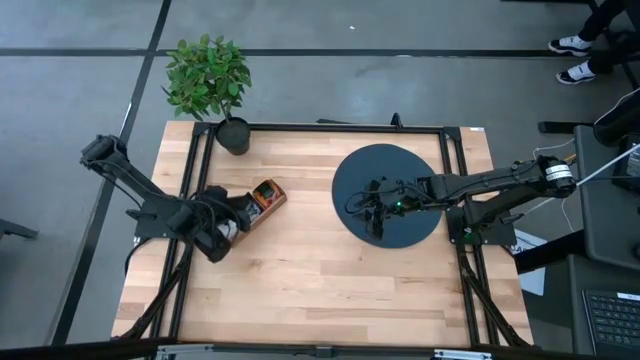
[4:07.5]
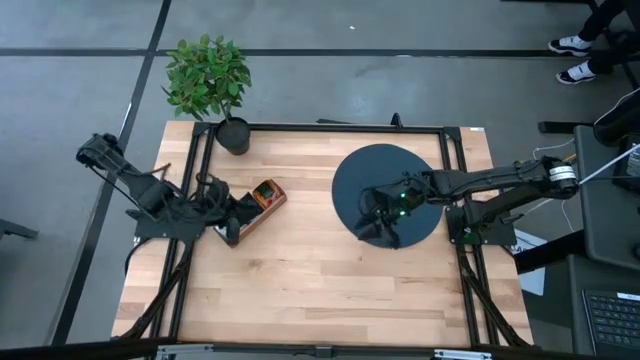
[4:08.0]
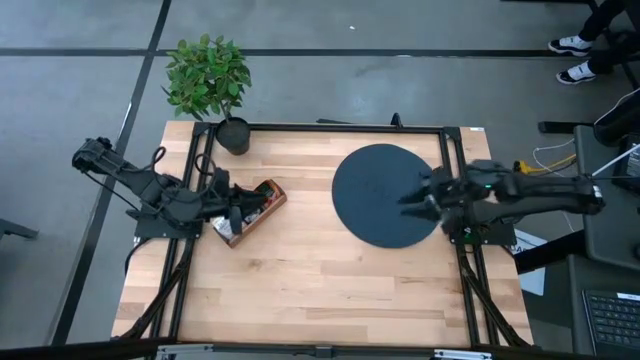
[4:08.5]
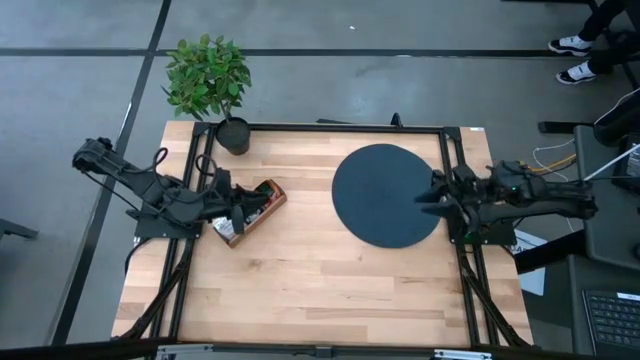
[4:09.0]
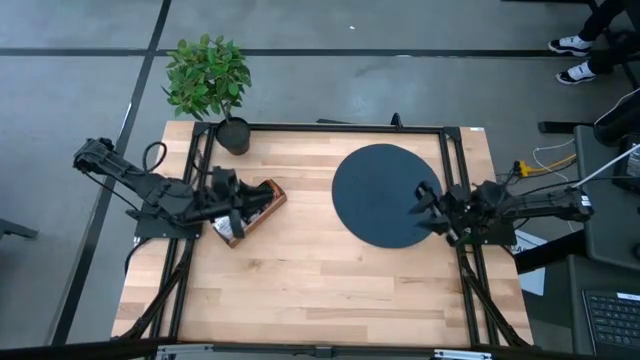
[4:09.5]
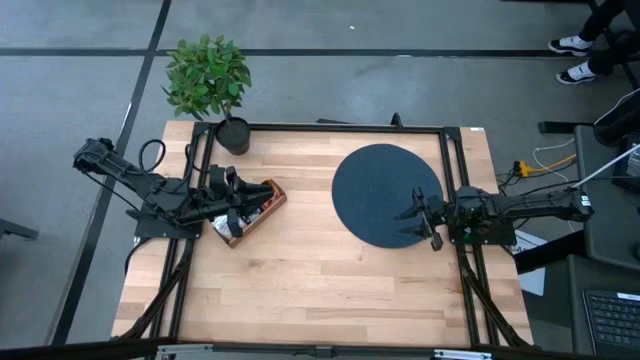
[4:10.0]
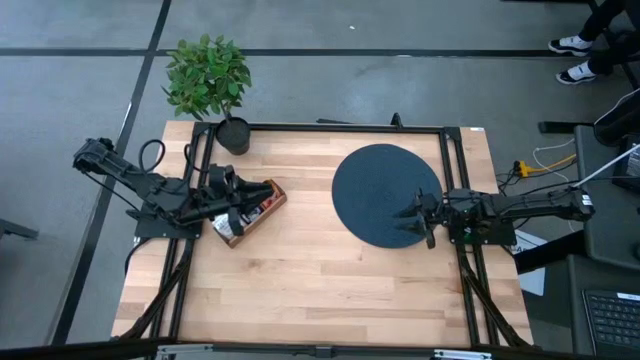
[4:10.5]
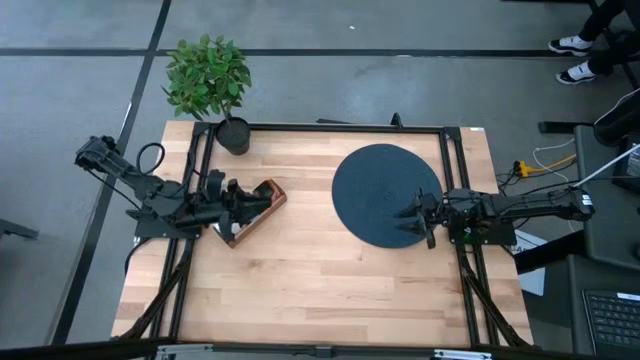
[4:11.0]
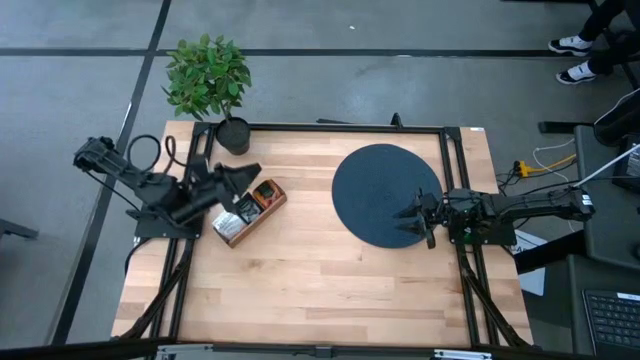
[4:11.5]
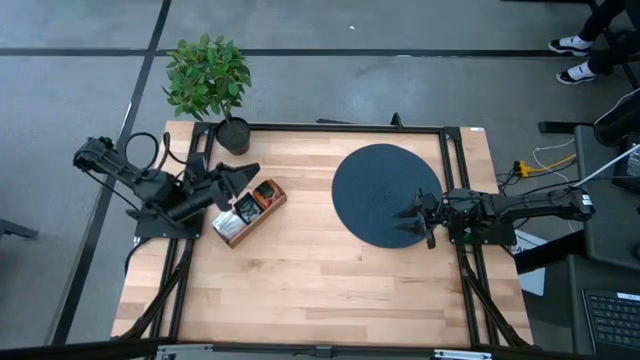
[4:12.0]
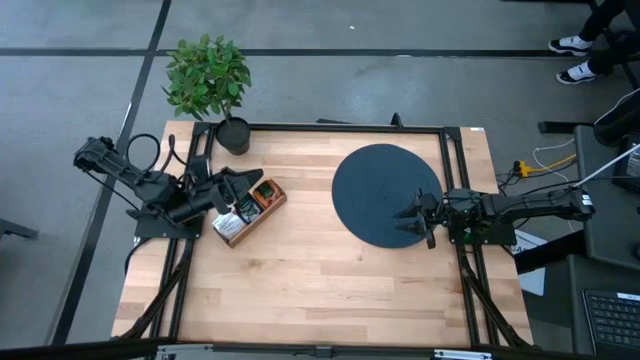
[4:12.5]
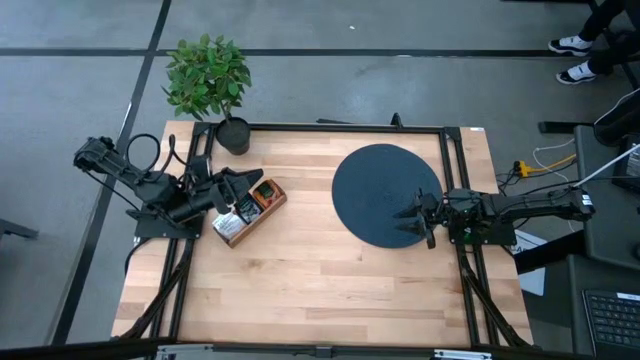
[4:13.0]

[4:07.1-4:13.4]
Task: Pick & Place Tea
Return to Home Position

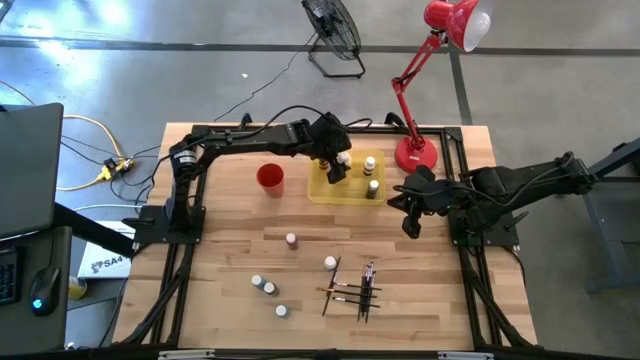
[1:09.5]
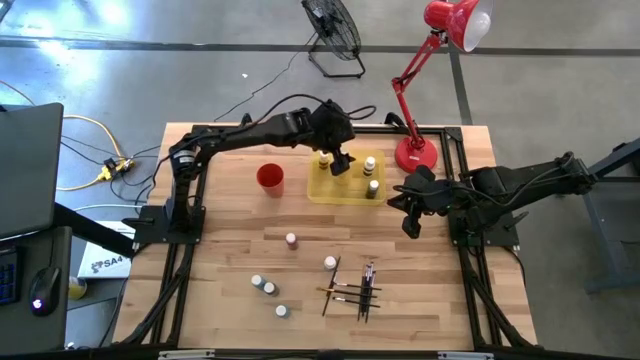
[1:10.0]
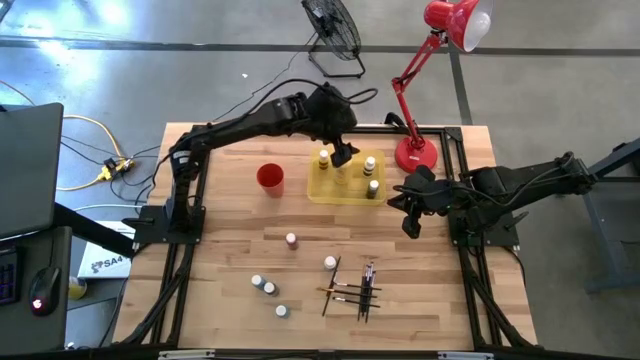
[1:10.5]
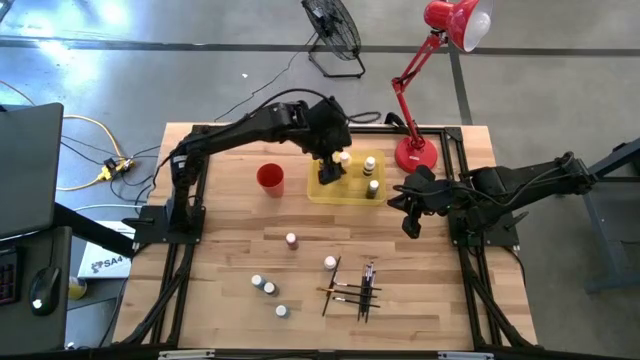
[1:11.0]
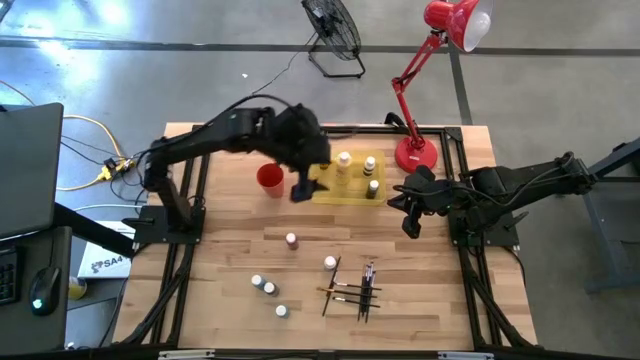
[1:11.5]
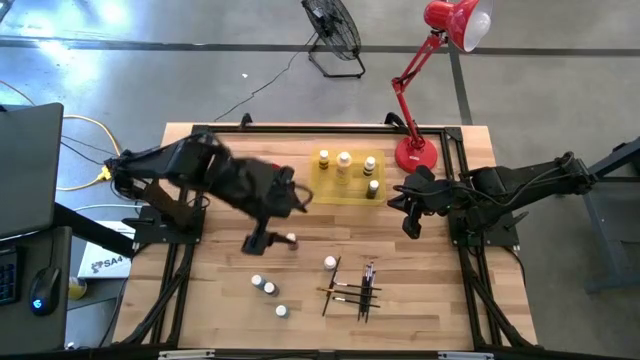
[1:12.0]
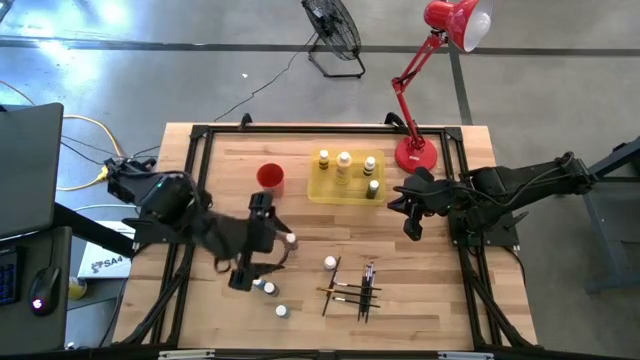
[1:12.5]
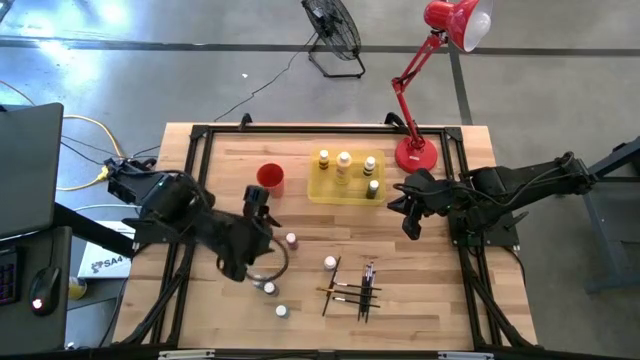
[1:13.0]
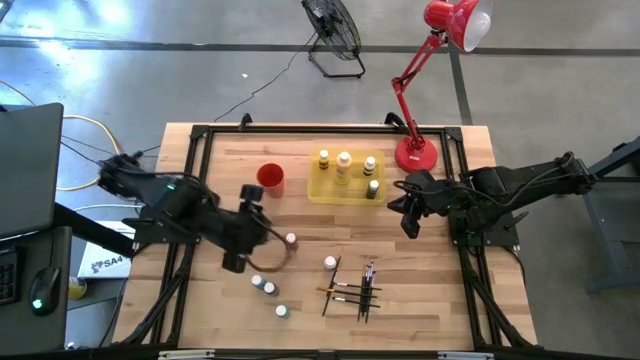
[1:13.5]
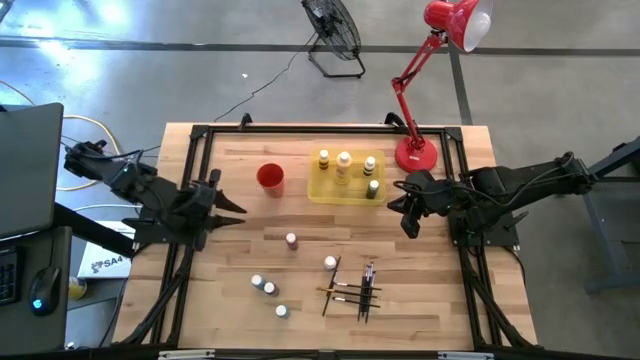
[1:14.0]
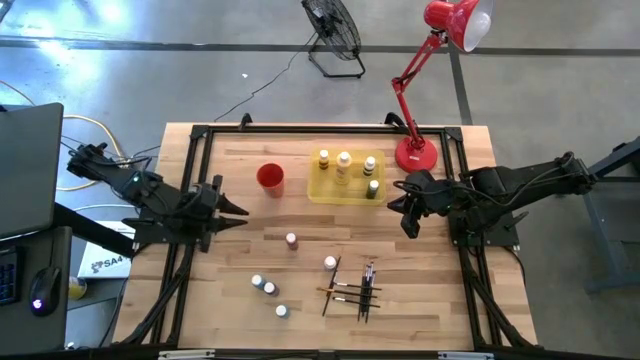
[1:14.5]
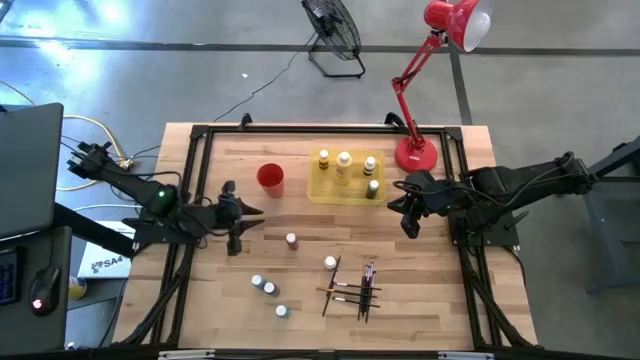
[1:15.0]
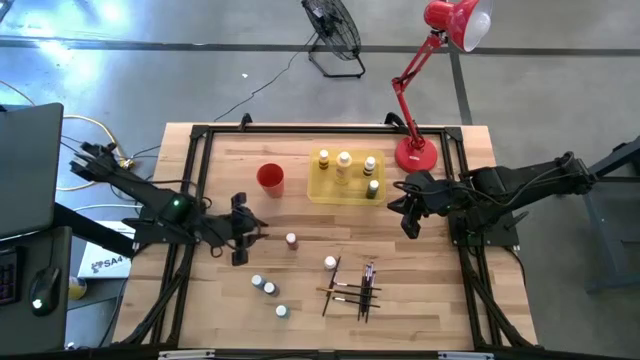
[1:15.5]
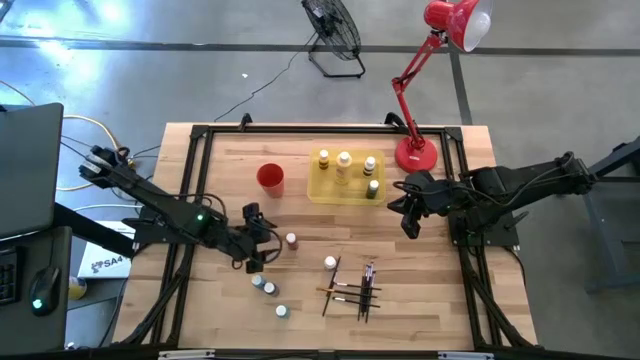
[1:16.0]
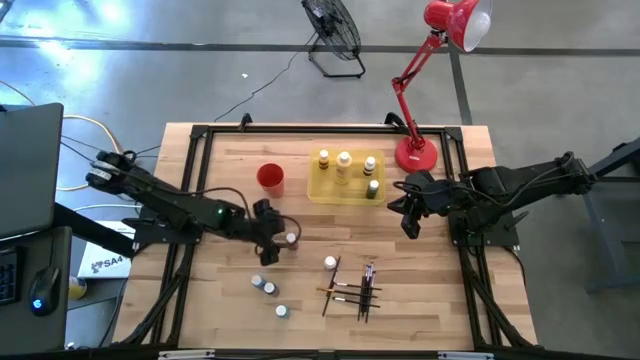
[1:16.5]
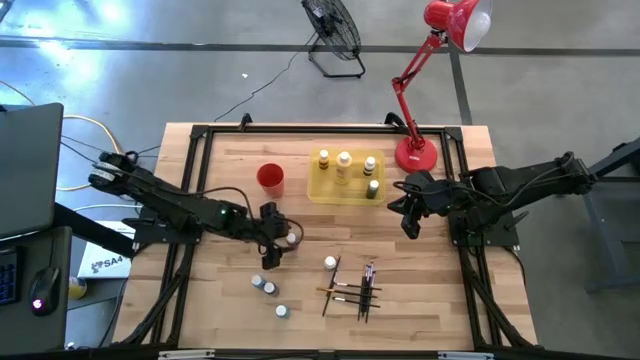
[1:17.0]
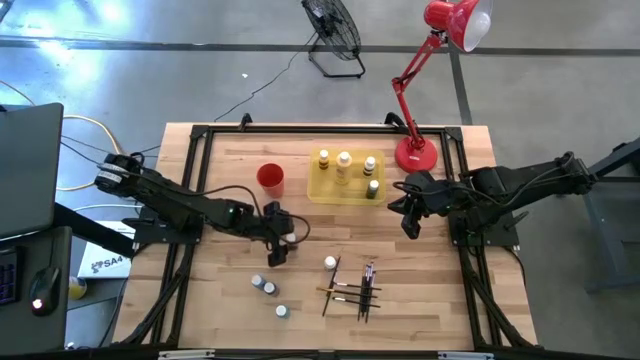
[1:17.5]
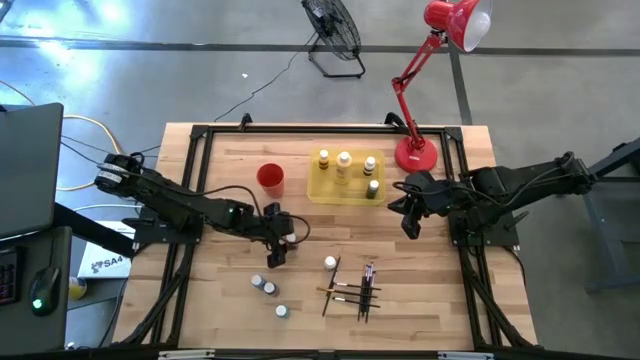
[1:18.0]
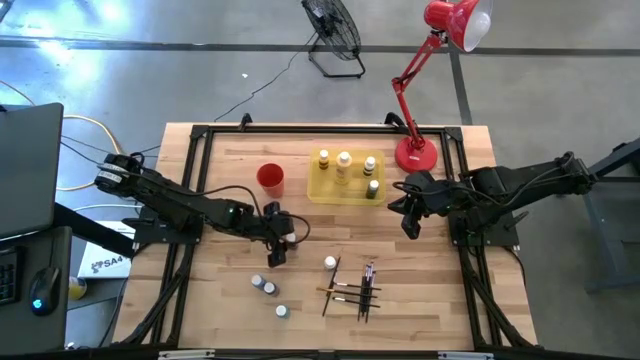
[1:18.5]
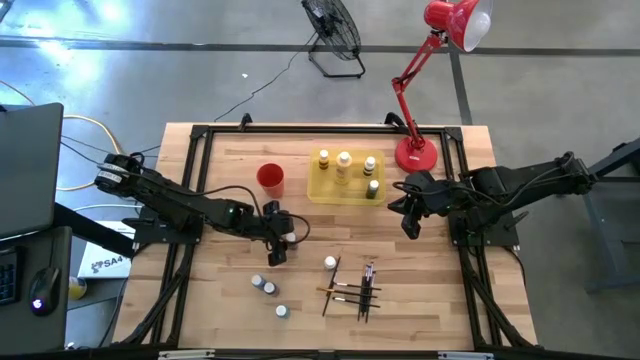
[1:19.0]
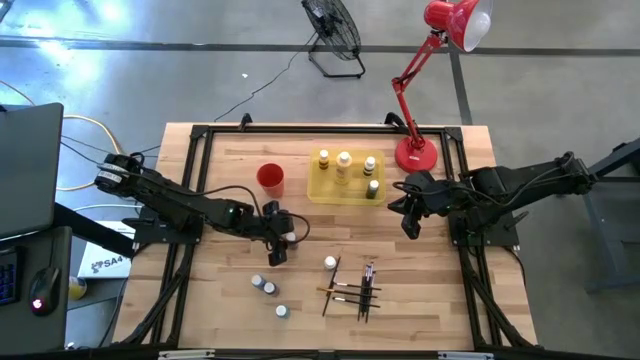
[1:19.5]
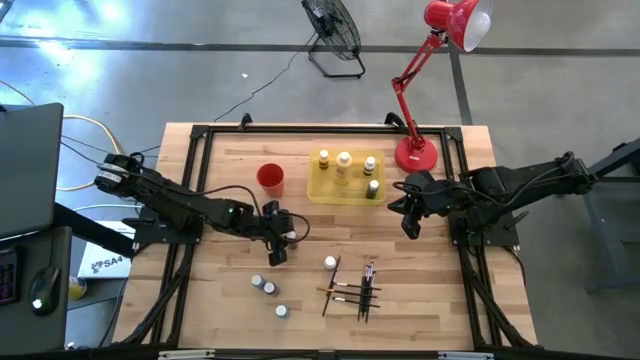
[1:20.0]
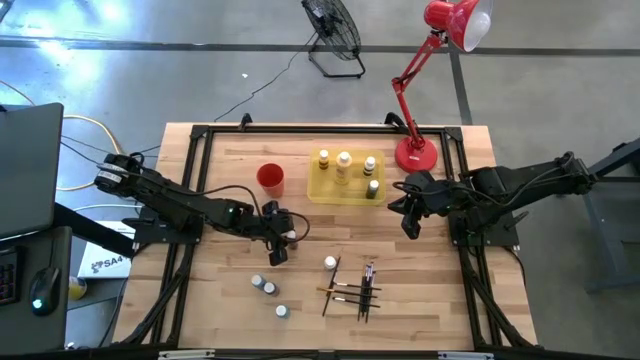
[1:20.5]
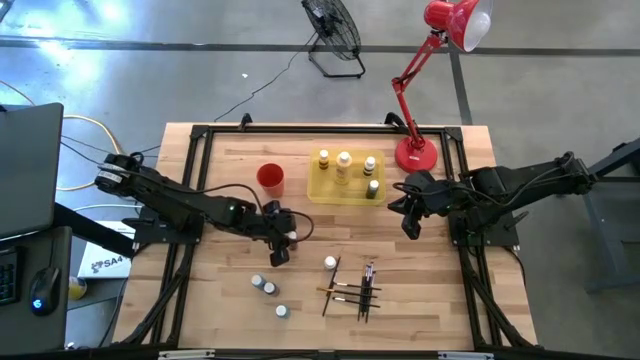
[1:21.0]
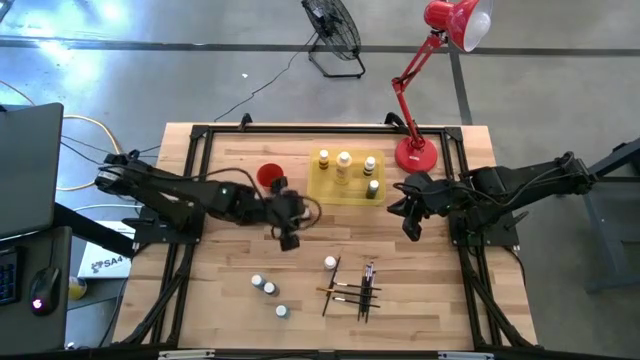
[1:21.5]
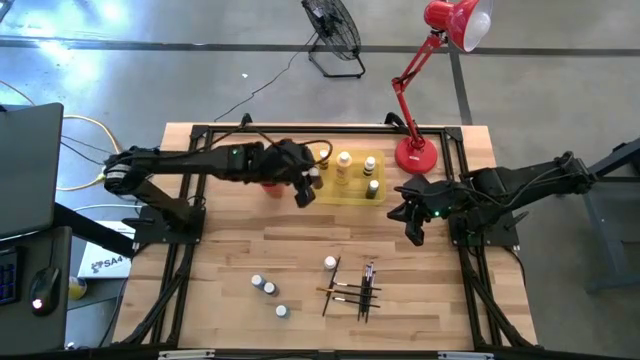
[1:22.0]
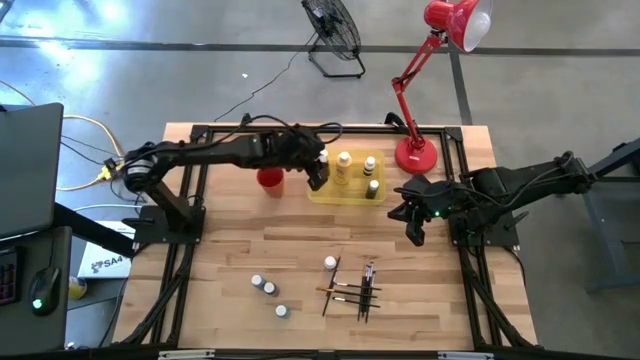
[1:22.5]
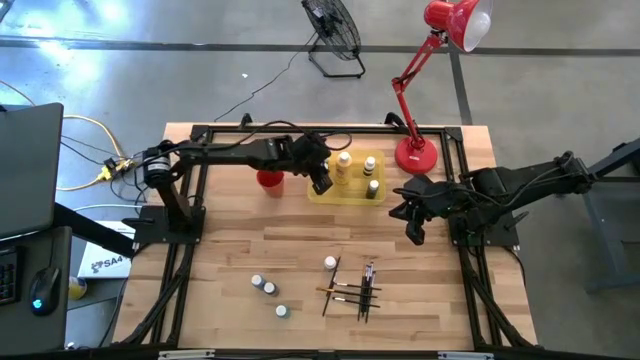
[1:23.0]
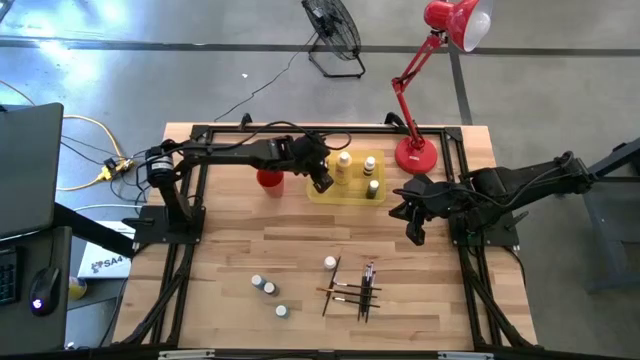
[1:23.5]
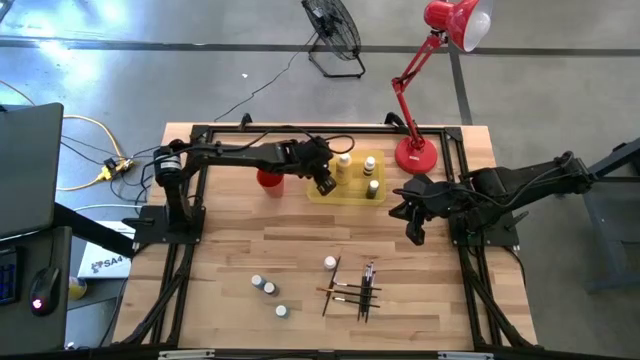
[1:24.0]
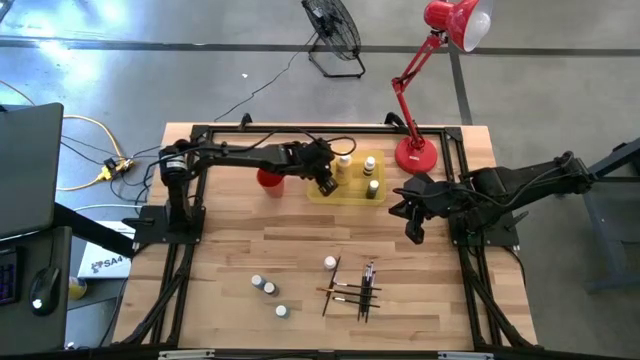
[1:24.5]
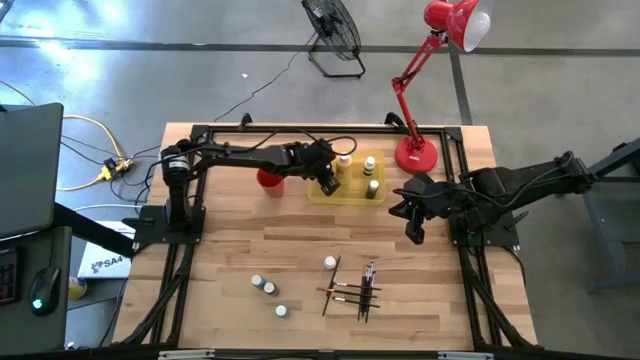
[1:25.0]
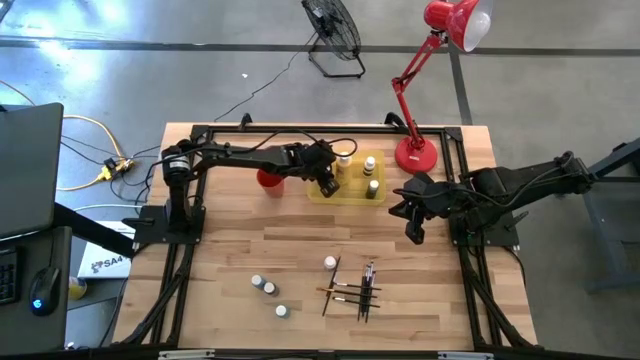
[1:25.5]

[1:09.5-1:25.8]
Task: Pick & Place Paint Supplies
Put the red paint bottle into the yellow bin
